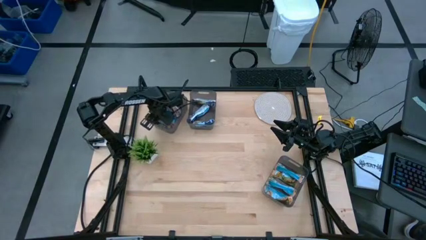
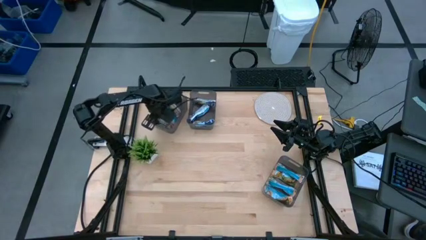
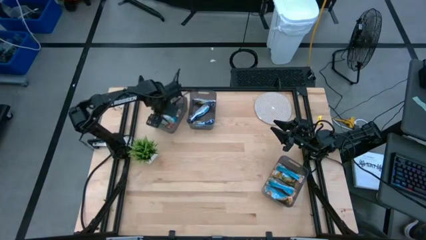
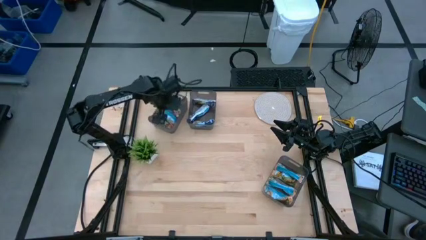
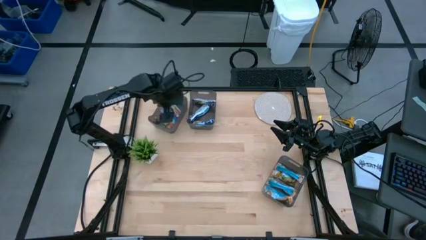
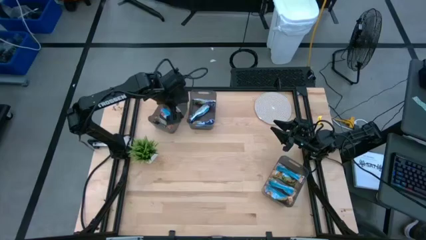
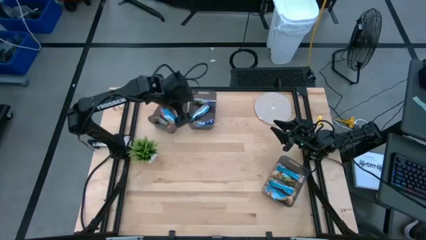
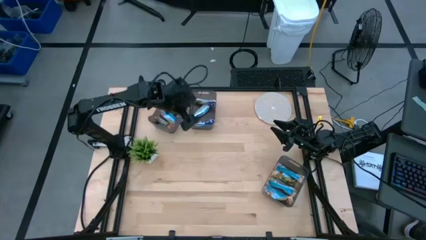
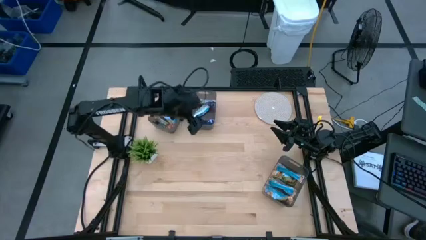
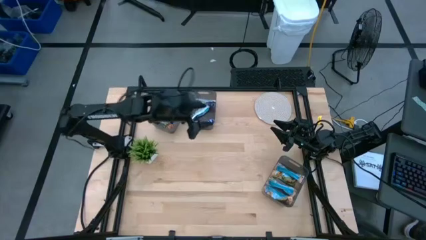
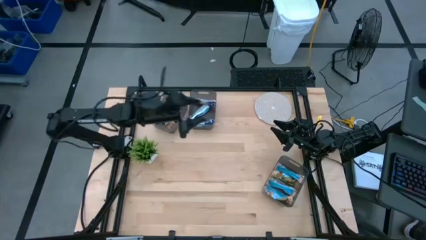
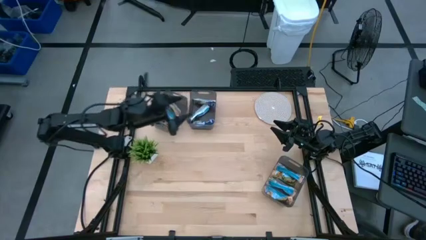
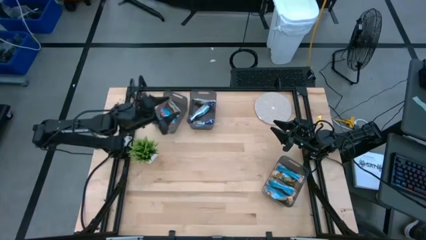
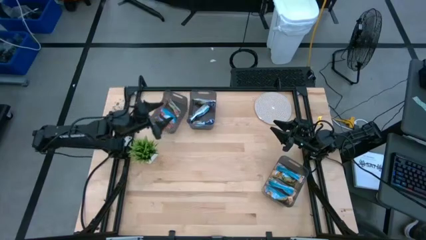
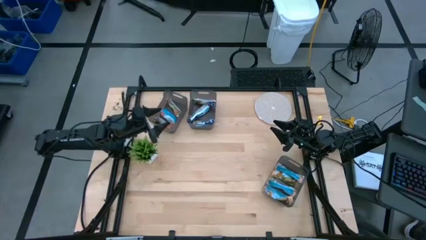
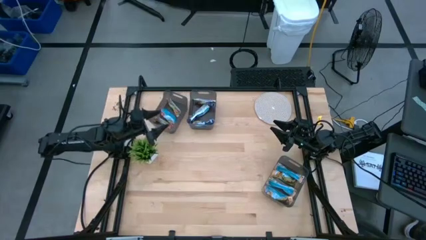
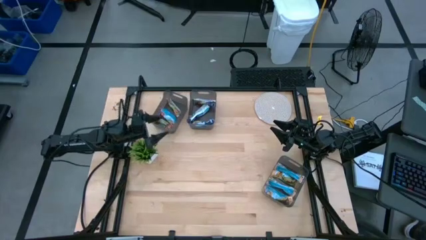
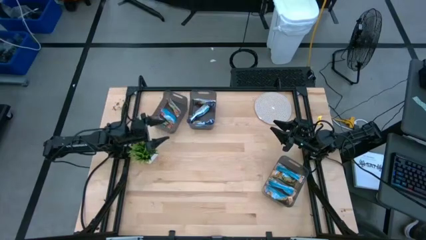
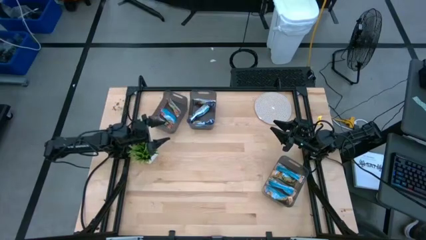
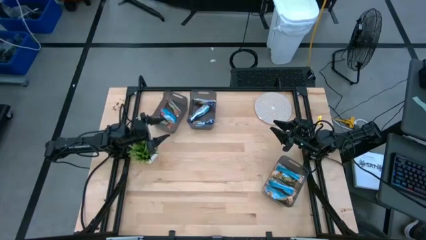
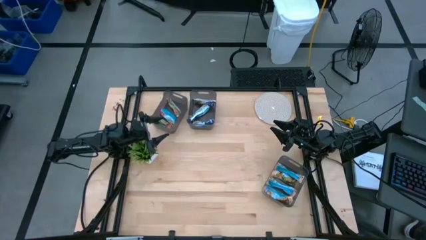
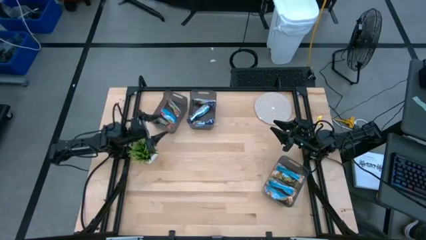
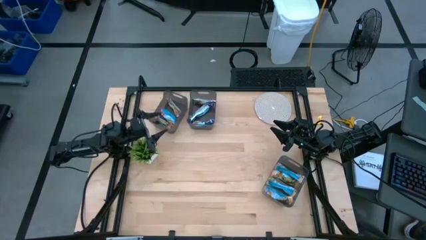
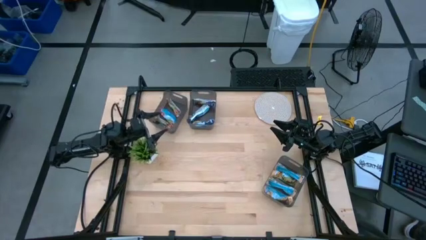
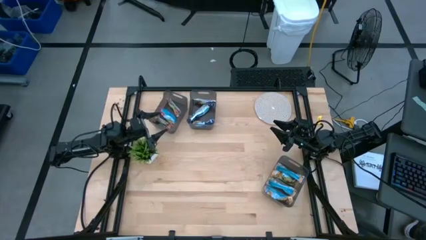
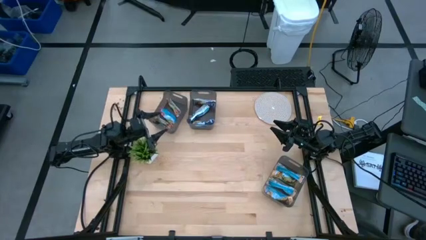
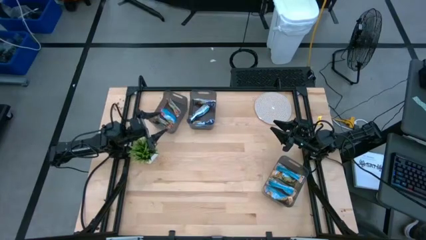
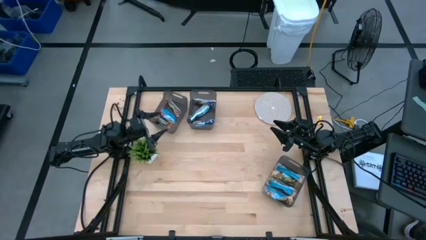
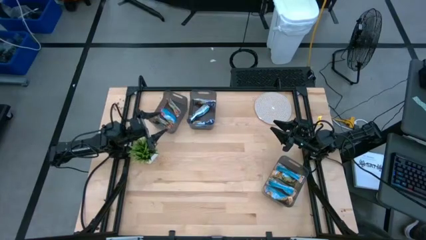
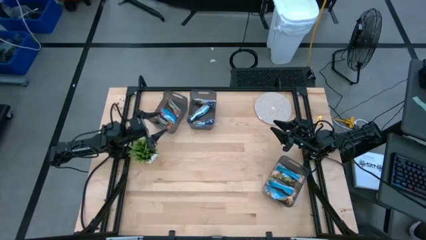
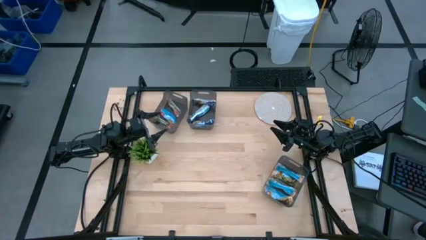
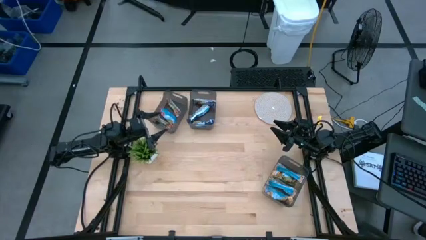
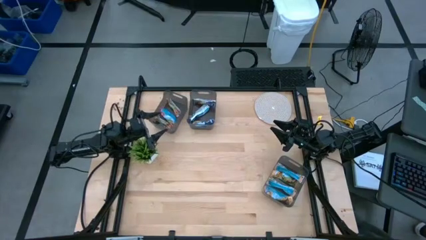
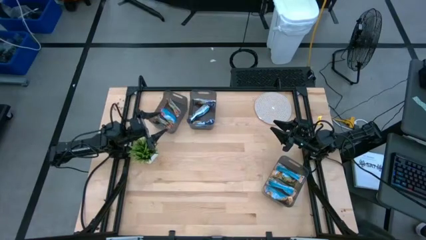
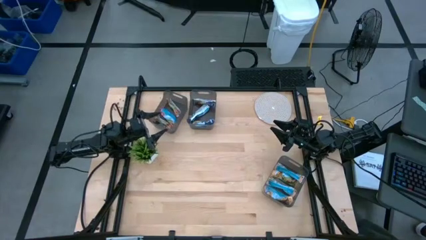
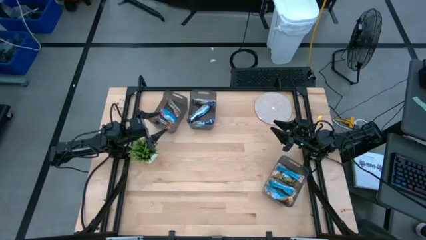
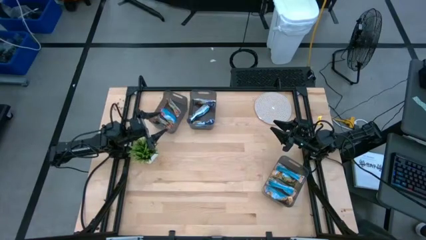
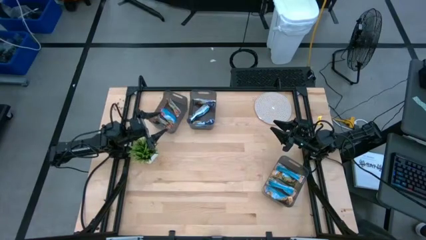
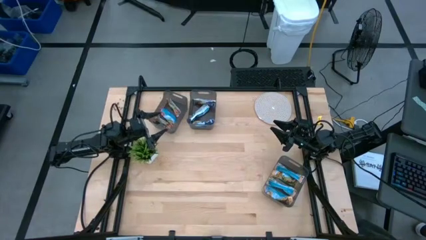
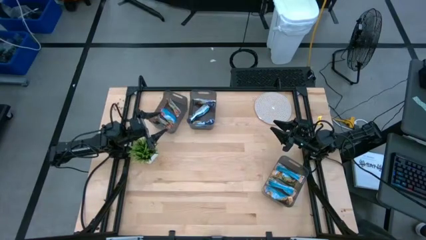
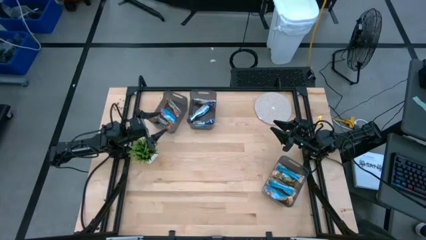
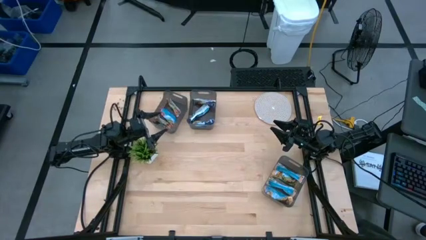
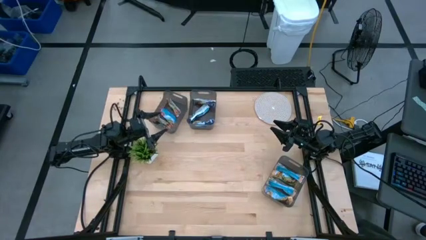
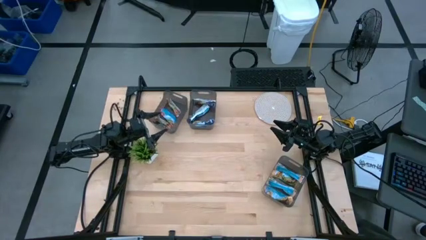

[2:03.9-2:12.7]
Task: Pick and place Granola Bars by type
Return to Home Position
